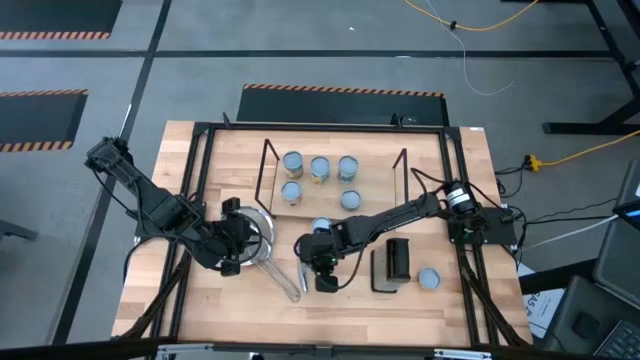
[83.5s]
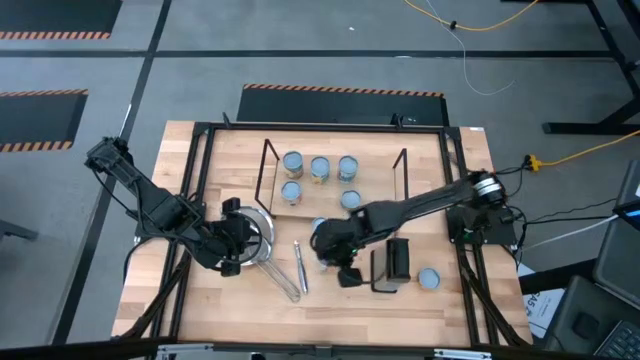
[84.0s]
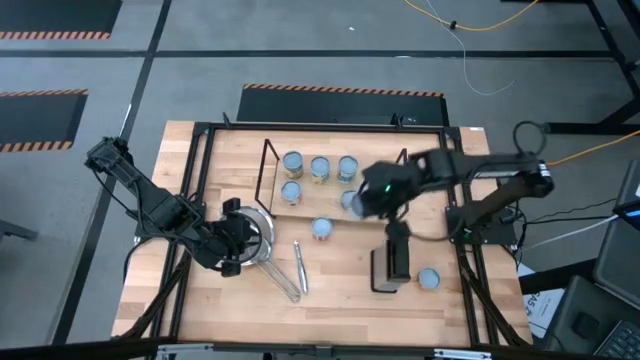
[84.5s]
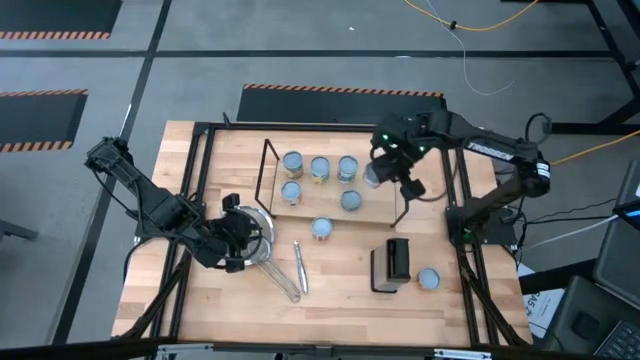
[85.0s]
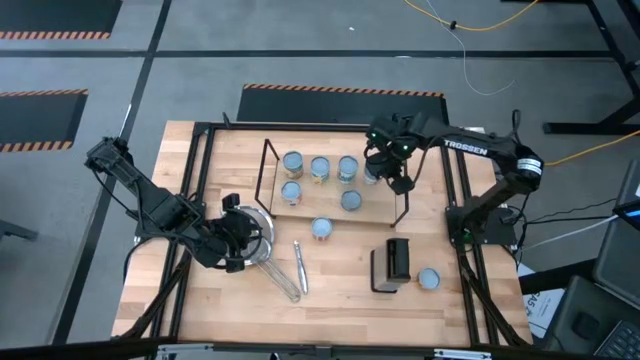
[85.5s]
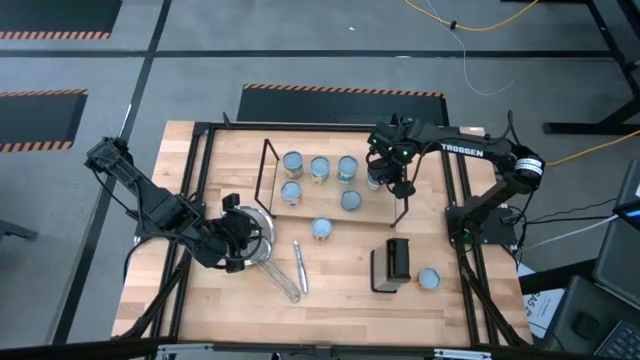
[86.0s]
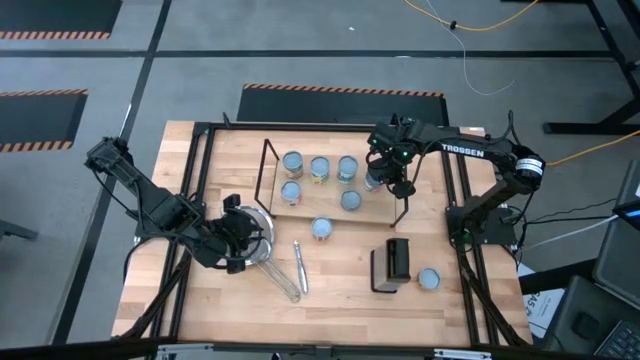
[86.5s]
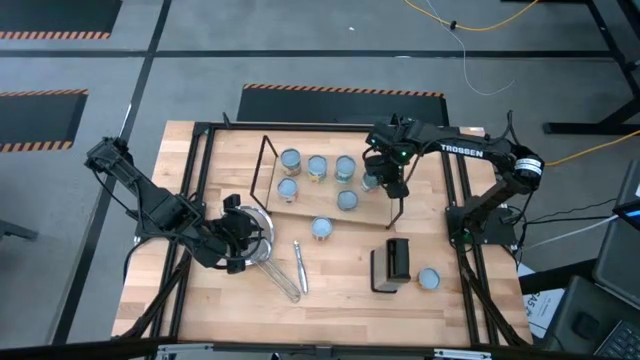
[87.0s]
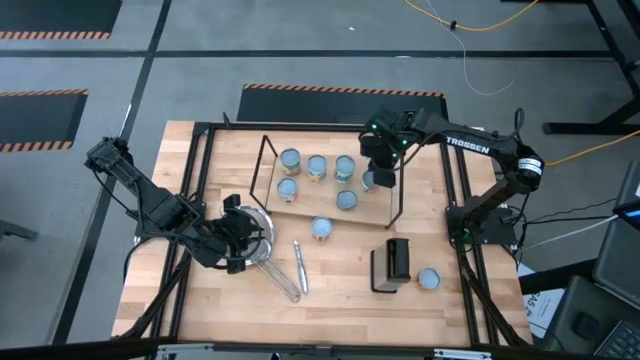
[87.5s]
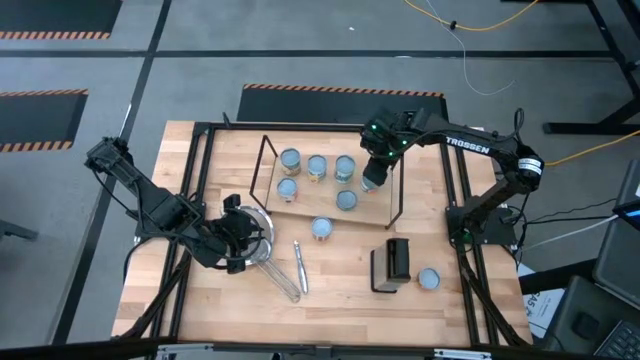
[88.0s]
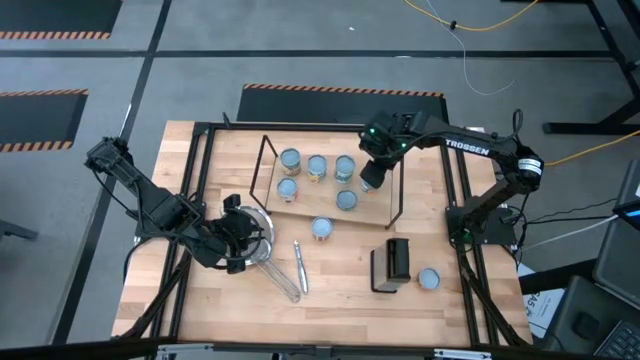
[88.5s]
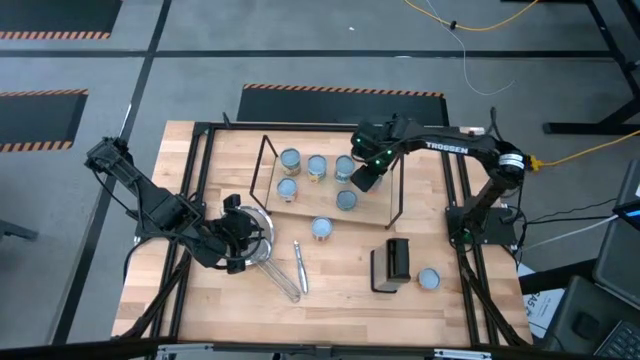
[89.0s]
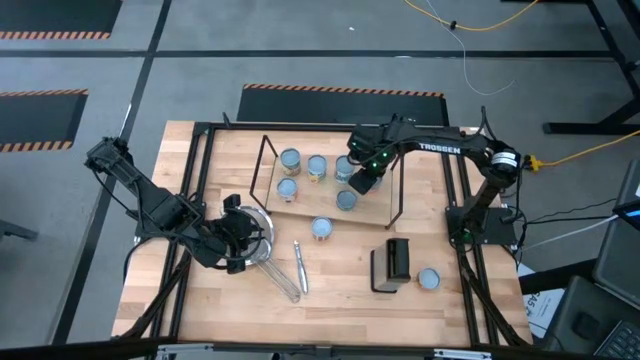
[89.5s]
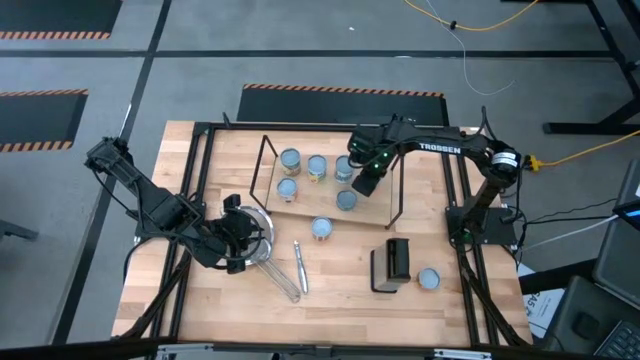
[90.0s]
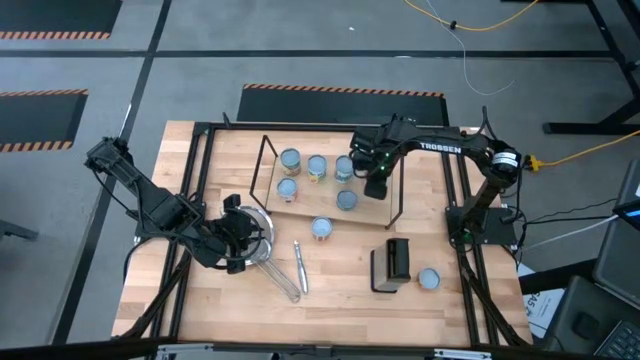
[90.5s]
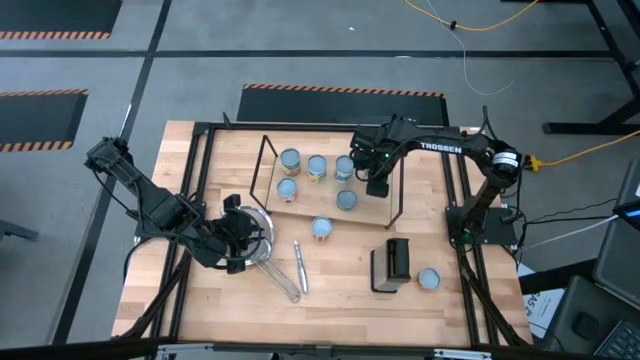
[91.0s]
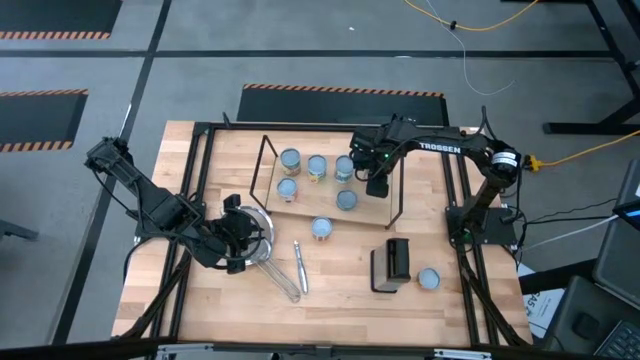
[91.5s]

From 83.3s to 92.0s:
Task: Pick and place cans onto a shelf
Put the green can on the shelf

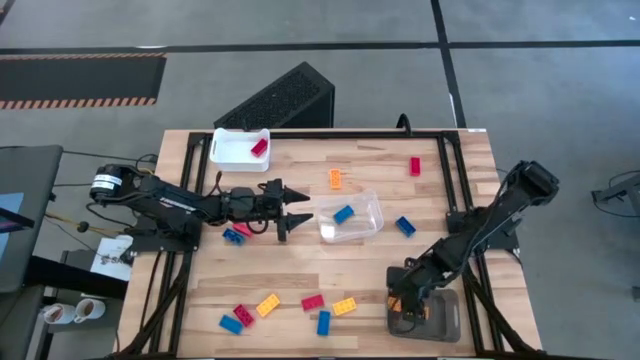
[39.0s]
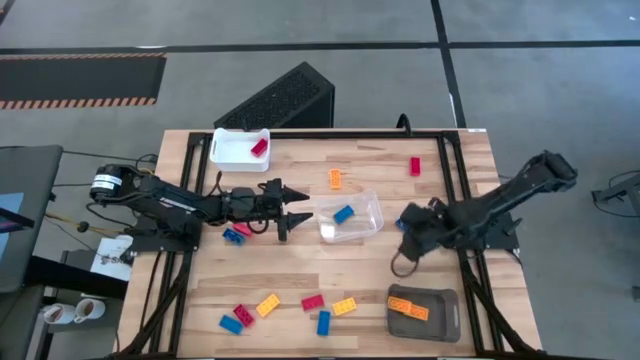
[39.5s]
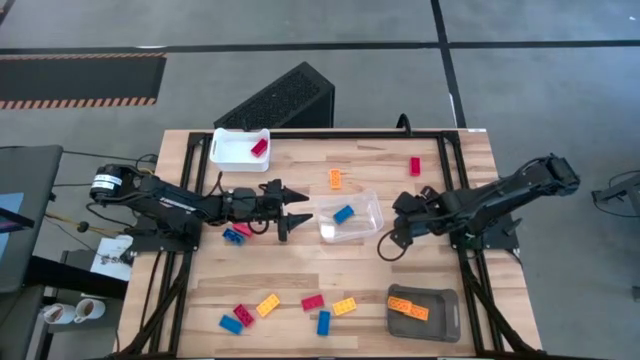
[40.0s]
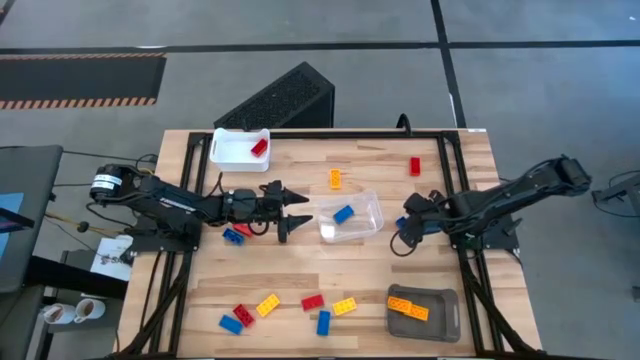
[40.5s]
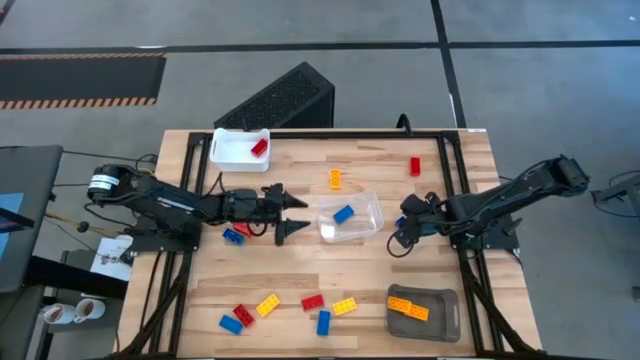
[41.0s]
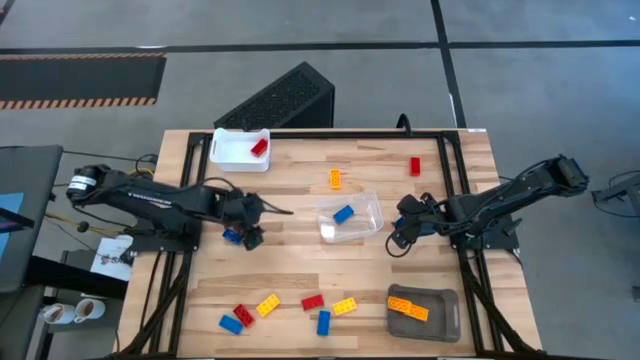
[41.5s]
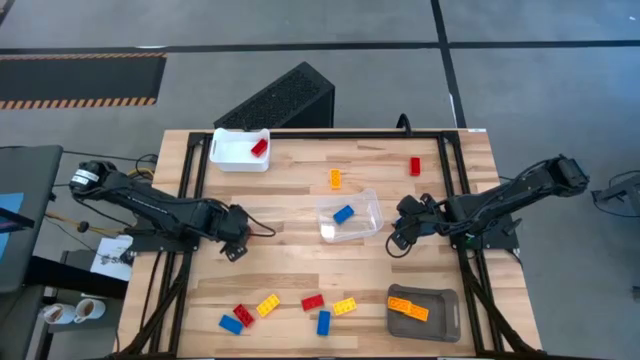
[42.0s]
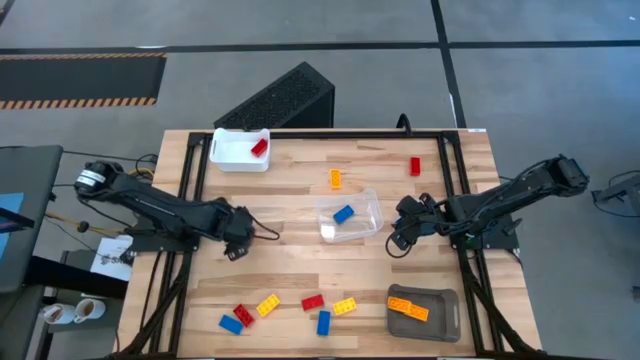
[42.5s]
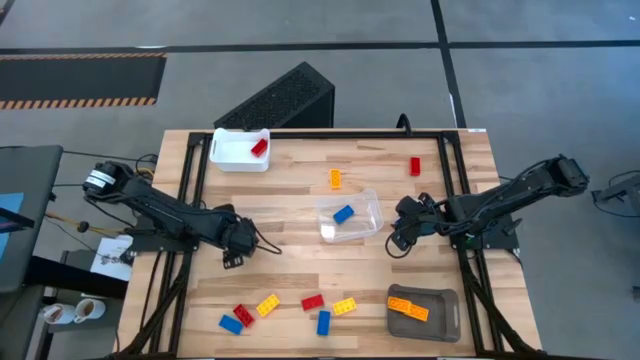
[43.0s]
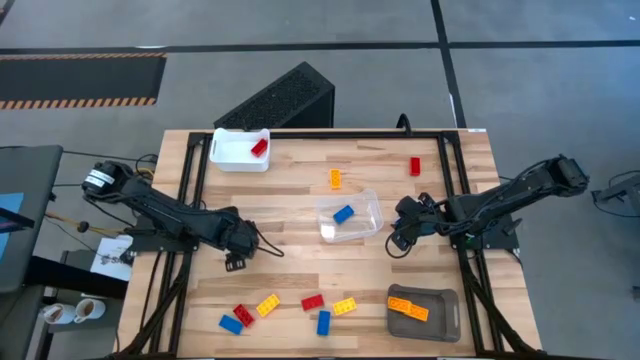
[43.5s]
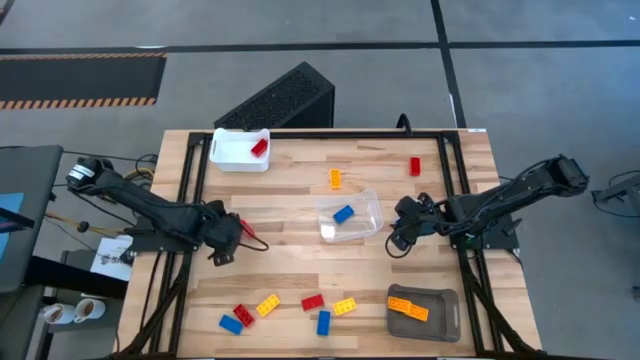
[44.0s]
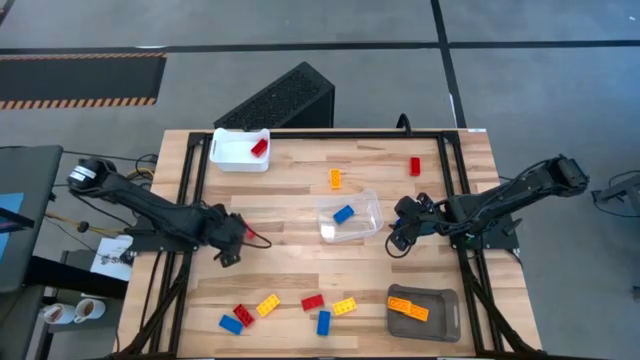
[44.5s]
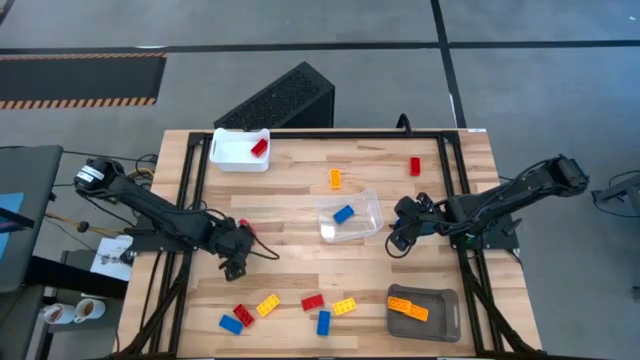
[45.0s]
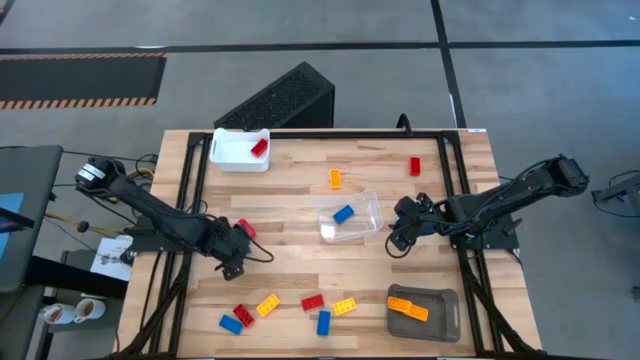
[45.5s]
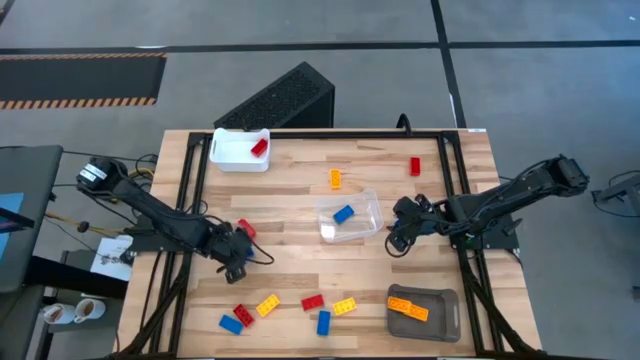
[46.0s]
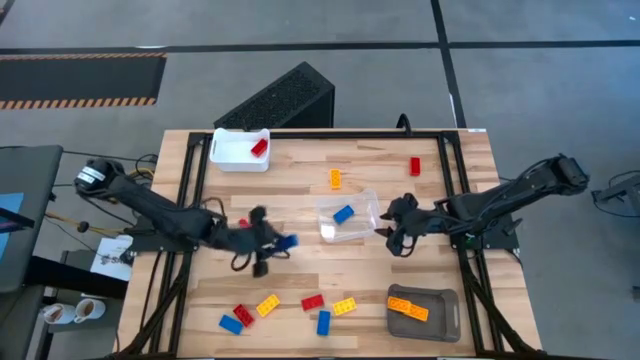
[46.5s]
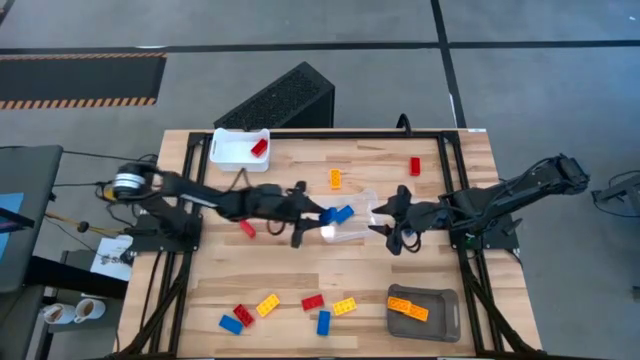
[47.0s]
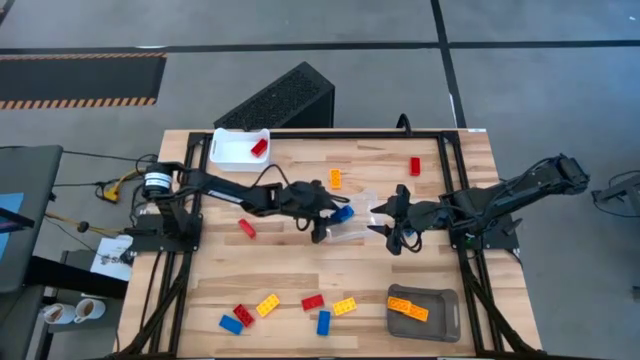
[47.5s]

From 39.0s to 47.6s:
Task: Sort & place blocks by color
Put the blue game piece into the transparent bin

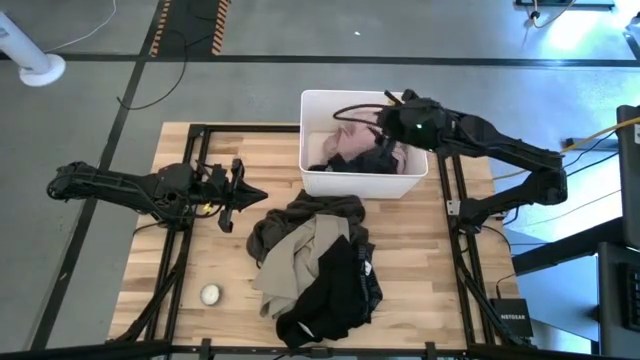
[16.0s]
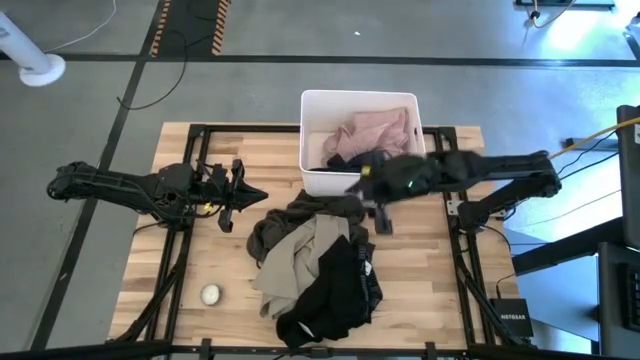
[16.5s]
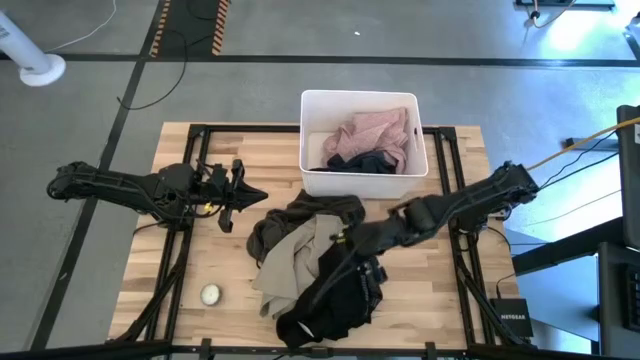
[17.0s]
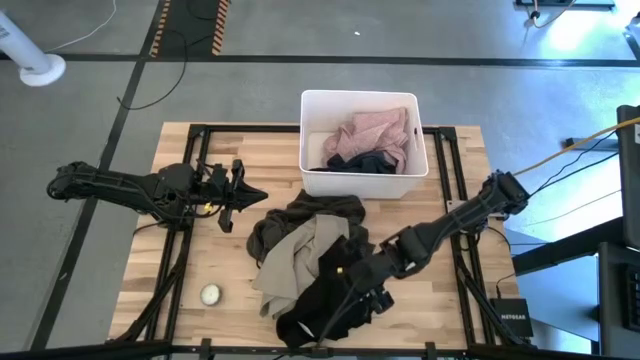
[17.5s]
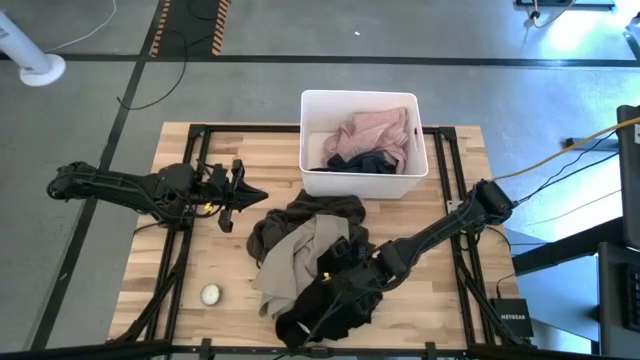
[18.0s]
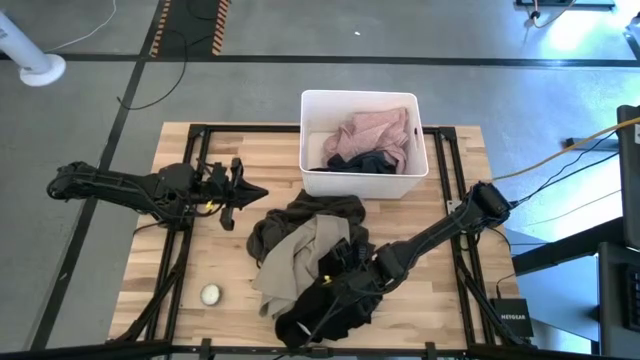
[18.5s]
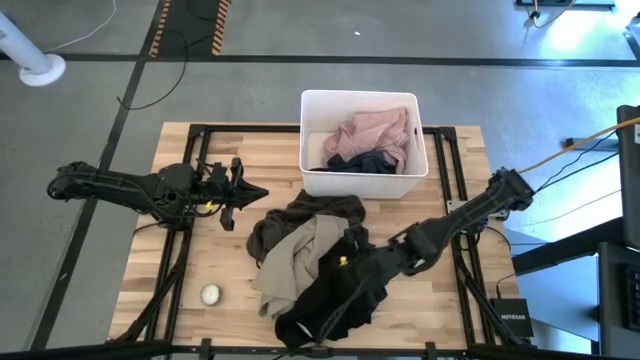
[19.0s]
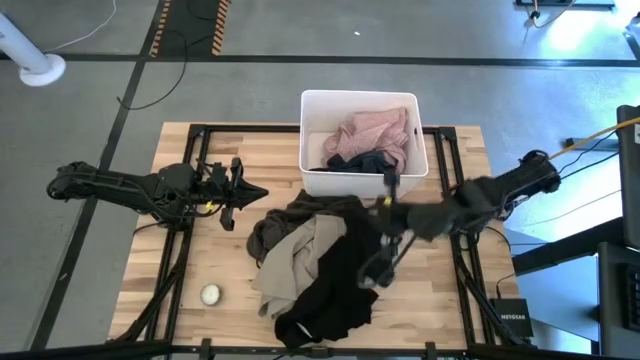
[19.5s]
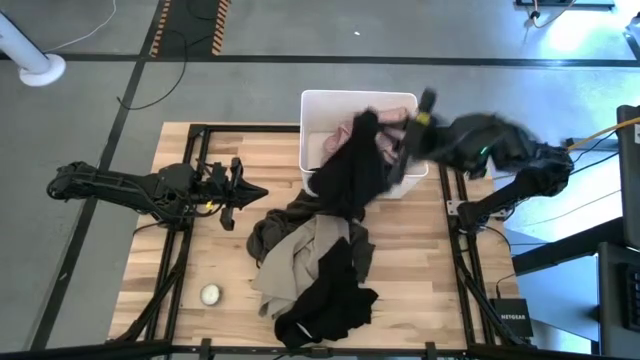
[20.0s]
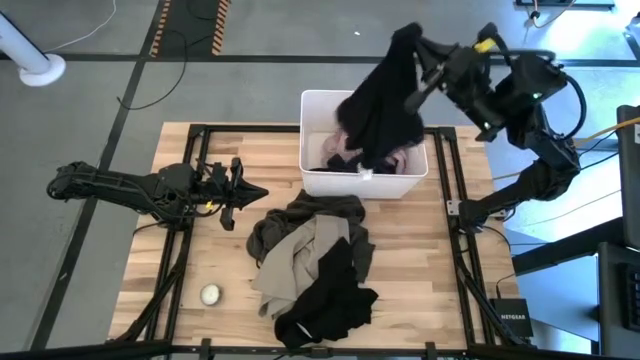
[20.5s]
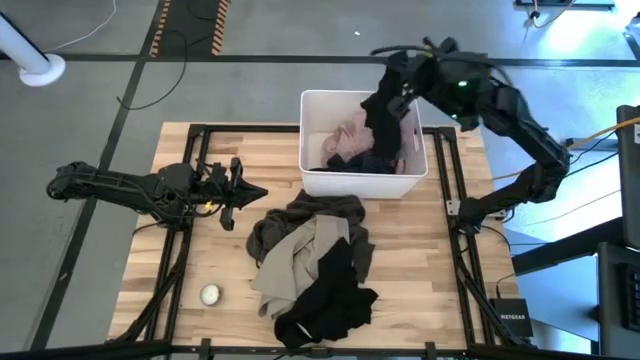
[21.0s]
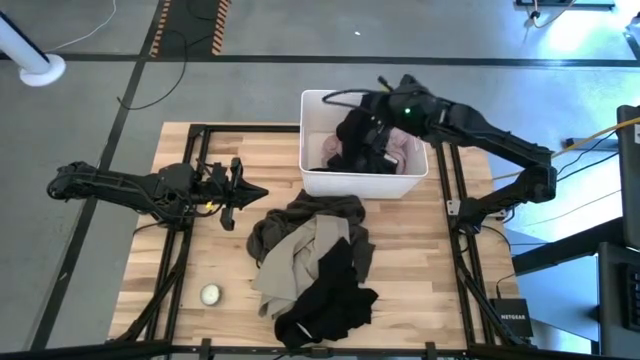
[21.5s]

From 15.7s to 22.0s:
Task: Sort clothes
Put the black boxer shorts into the white laundry bin
